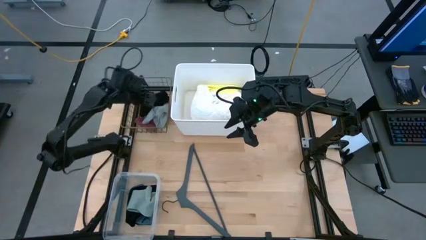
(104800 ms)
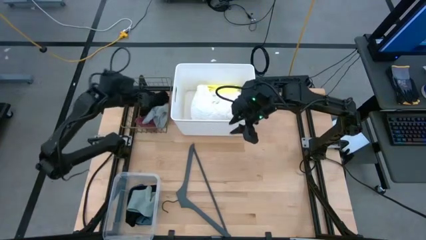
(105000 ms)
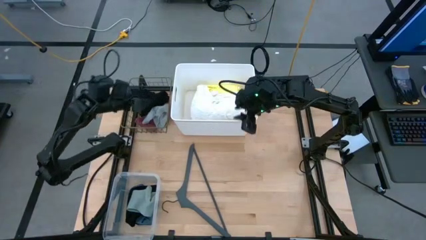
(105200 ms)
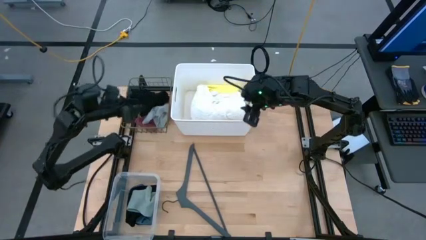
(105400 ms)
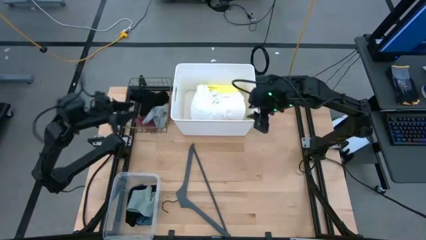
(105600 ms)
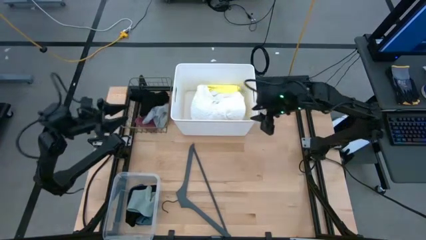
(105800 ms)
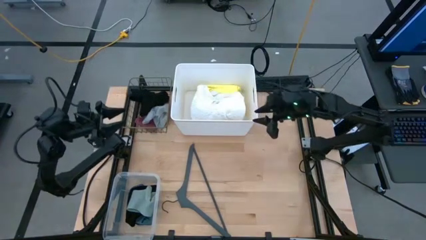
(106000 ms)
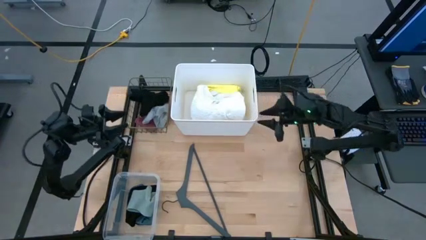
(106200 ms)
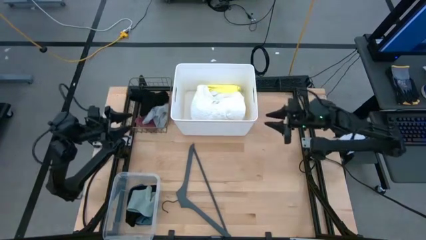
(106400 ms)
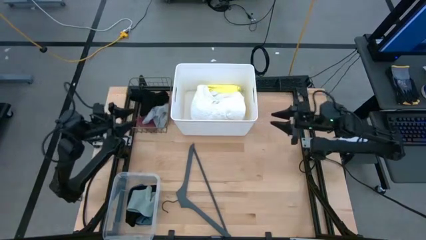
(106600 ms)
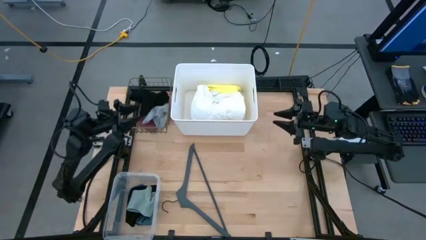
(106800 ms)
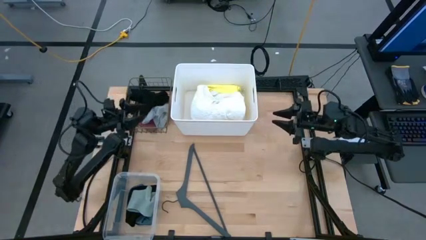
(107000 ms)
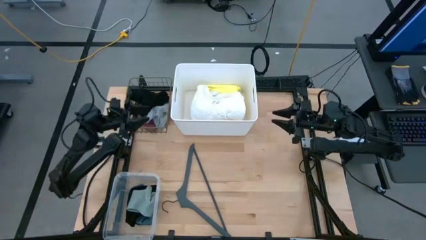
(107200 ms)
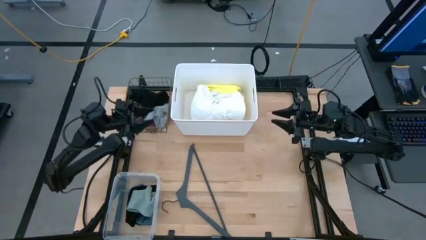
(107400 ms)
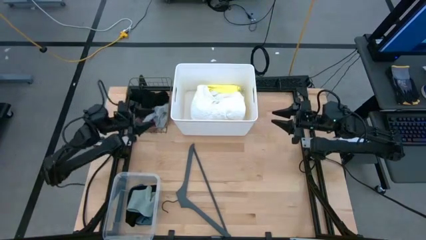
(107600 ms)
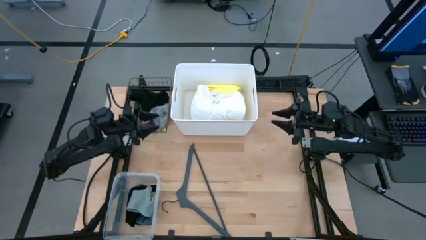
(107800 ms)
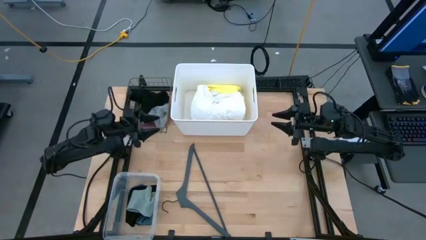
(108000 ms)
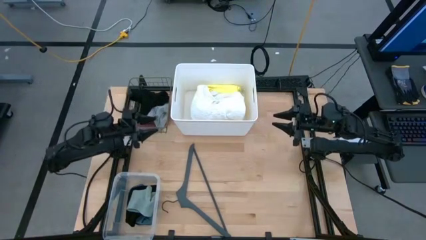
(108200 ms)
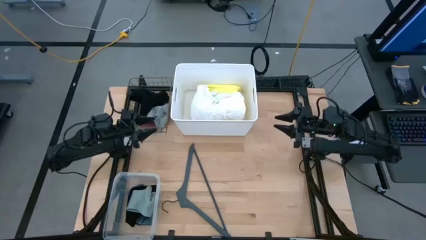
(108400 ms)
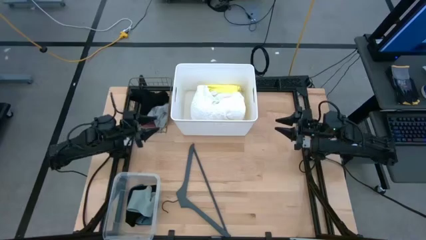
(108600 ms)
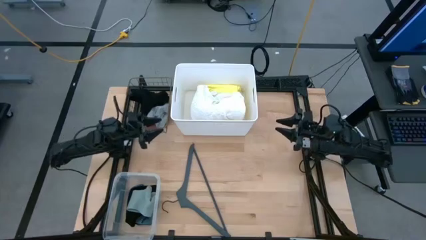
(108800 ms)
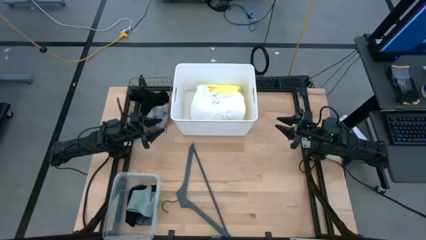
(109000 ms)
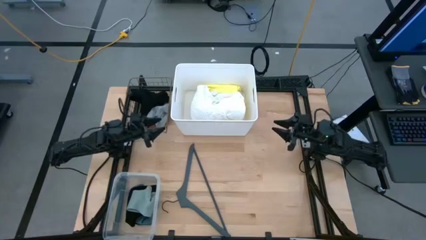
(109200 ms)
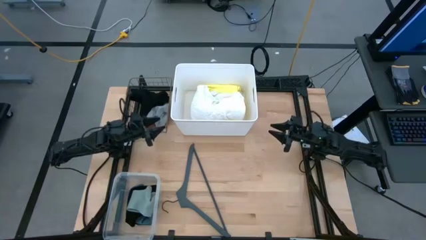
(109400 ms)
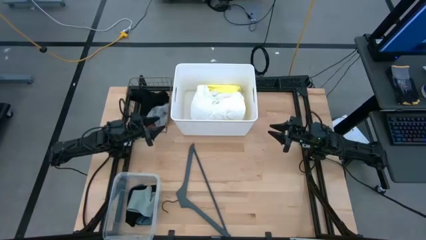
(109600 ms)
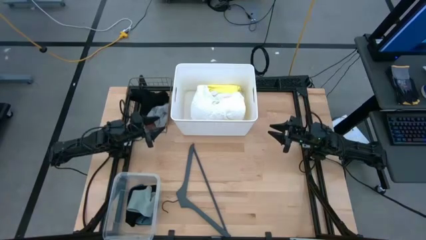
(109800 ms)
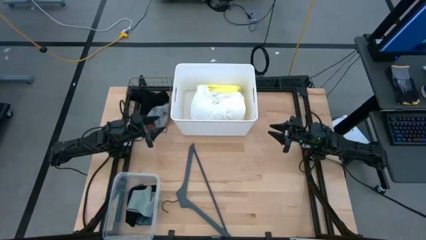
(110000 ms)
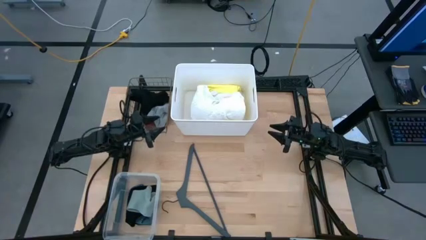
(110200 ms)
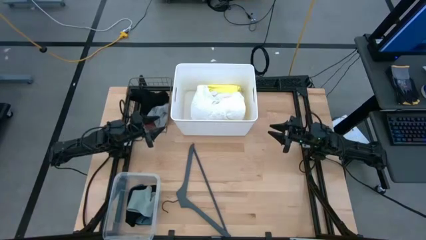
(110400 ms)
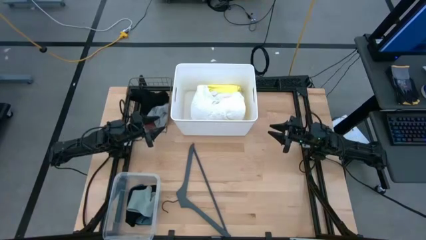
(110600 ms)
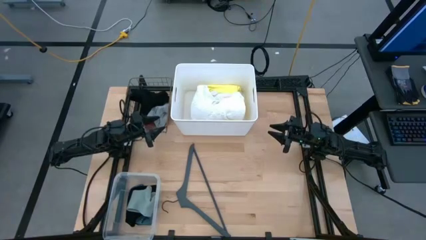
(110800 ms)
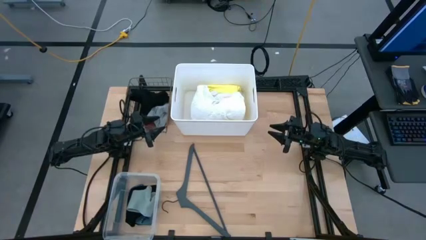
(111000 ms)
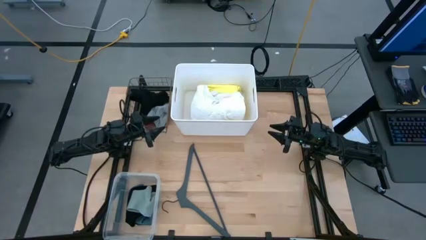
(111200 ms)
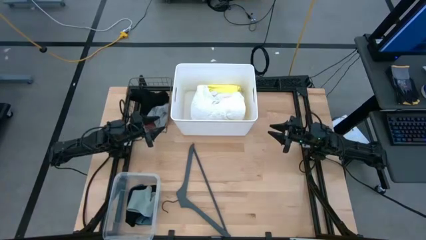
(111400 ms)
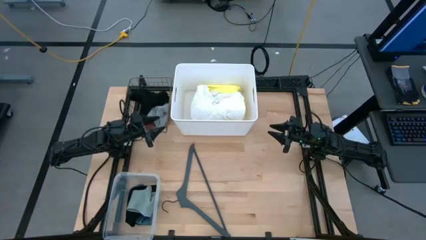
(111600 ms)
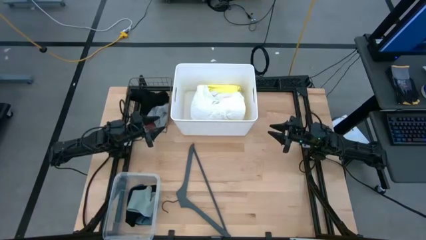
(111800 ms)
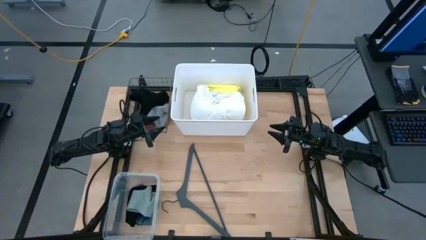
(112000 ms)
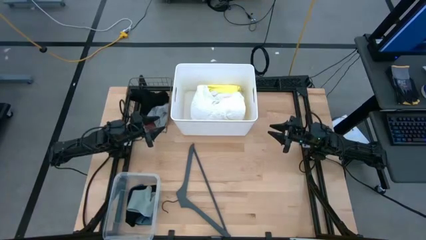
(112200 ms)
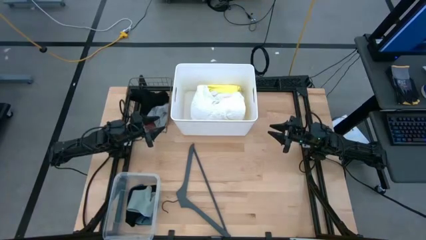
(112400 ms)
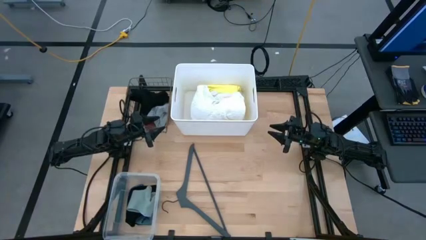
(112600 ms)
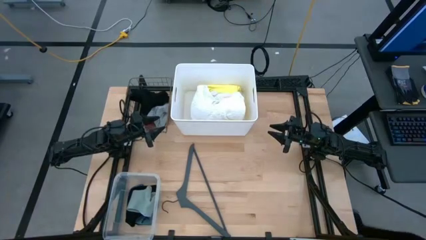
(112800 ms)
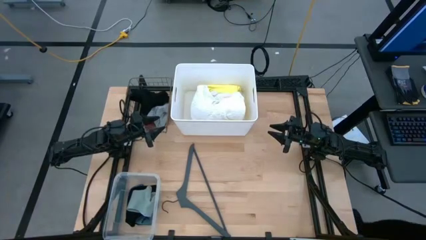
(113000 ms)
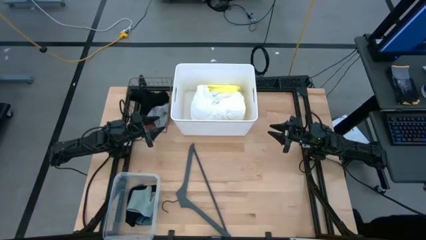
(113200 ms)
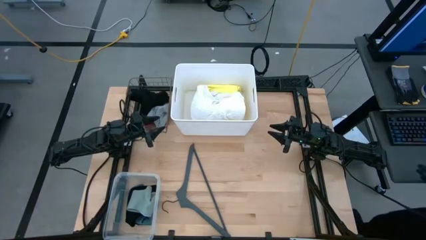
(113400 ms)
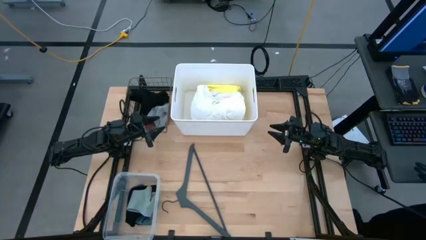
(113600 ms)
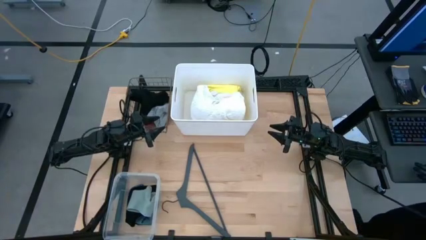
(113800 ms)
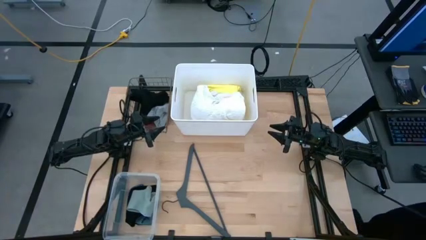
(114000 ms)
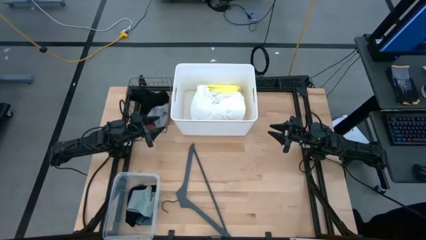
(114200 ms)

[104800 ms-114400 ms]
Task: Pick & Place Cloths
Return to Home Position
